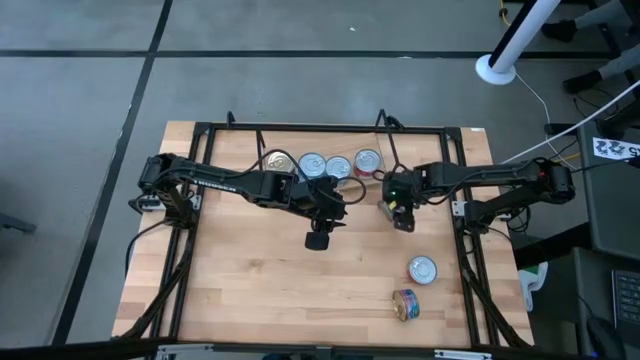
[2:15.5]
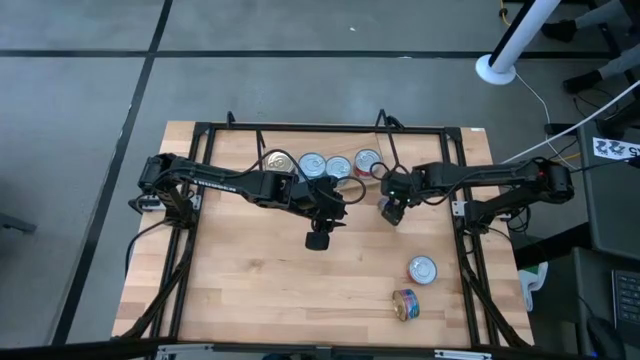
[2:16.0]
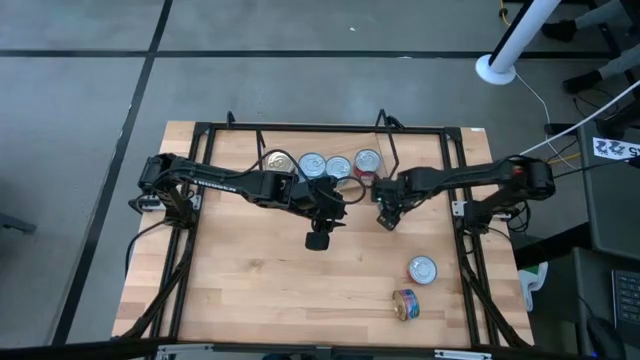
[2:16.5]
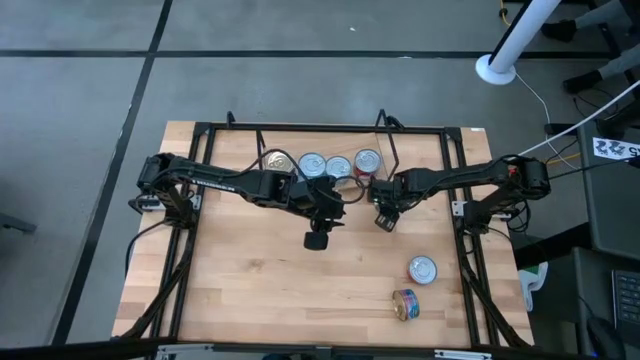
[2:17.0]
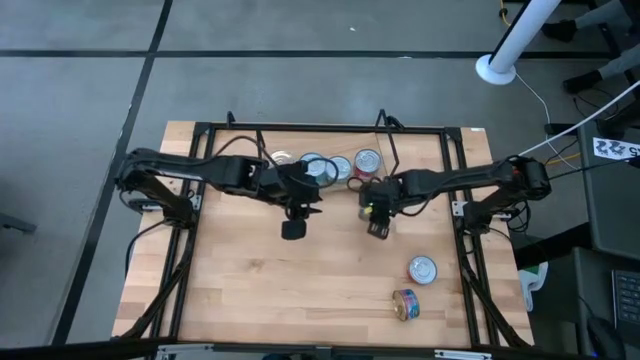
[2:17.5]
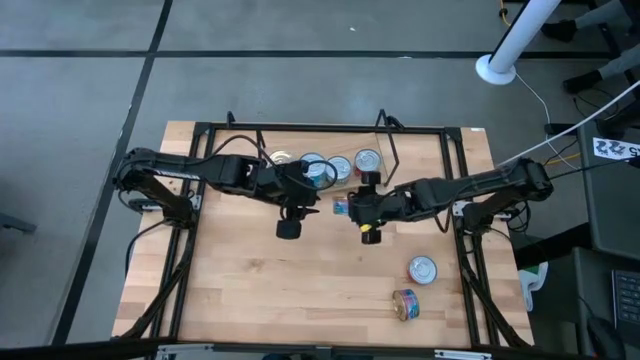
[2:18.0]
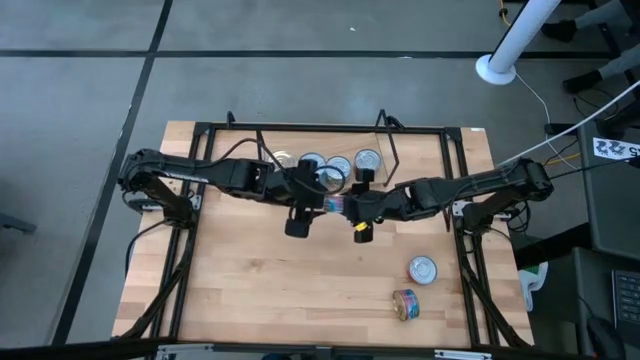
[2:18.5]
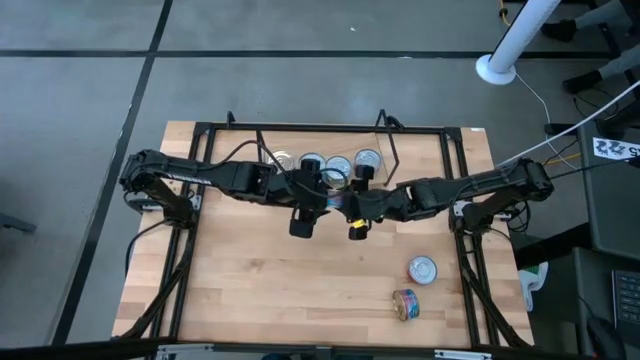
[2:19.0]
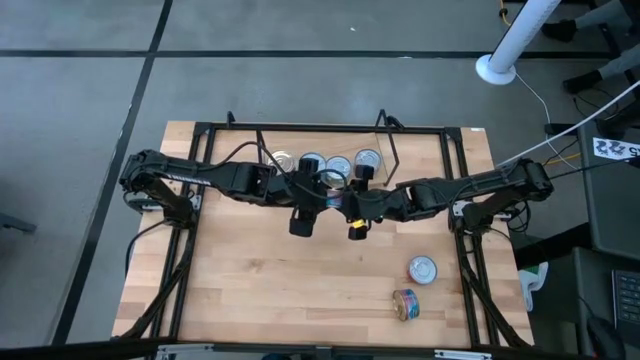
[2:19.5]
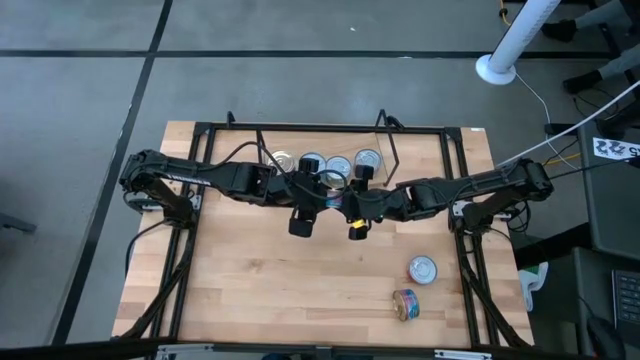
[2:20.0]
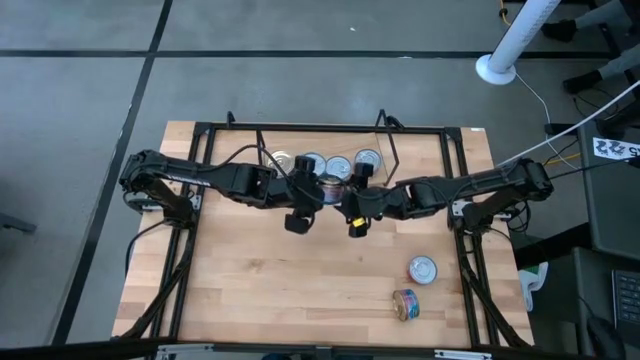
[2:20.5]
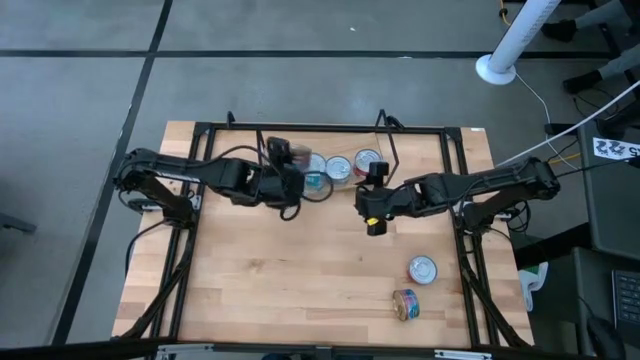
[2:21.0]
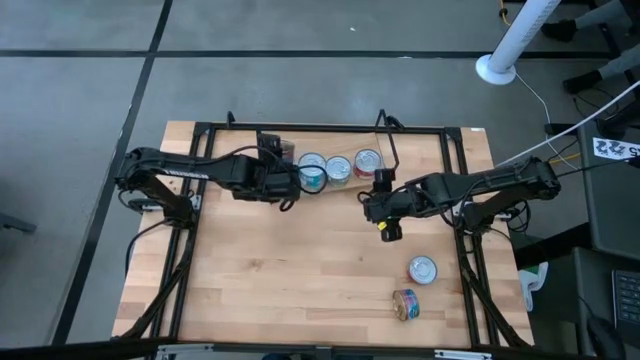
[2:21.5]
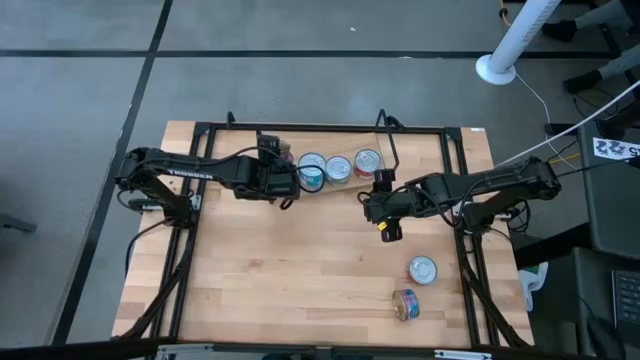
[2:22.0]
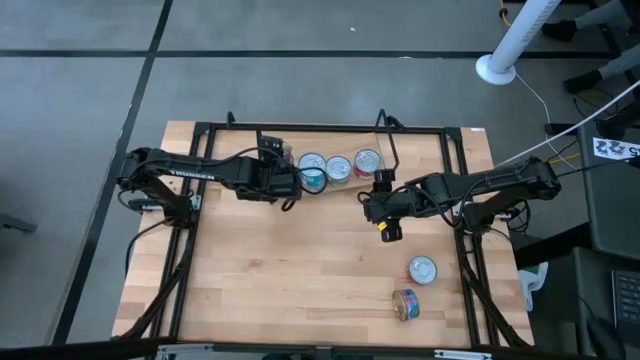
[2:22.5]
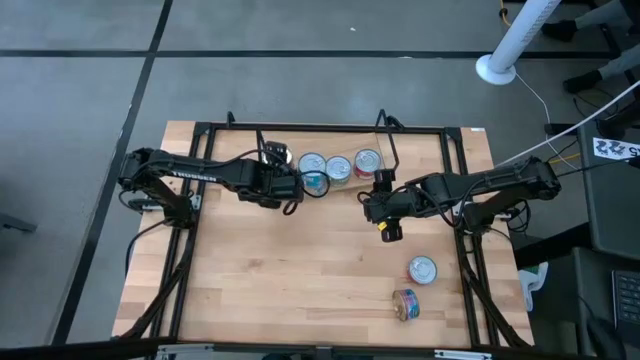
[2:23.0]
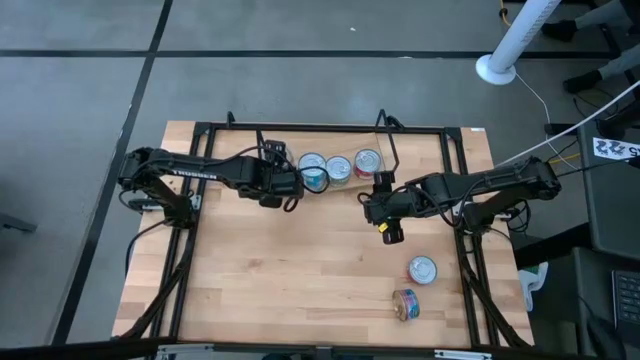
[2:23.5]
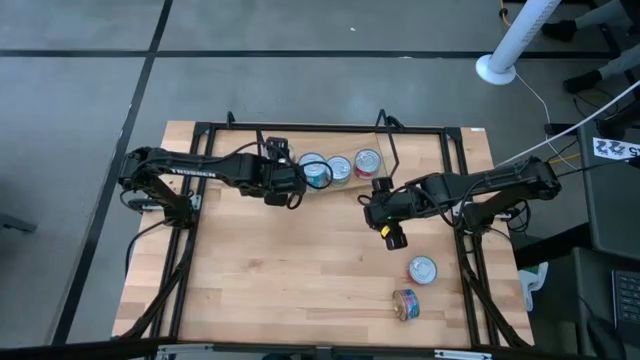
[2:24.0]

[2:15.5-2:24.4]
Task: Stack canned seafood by type on shelf
Stack the blue pink tuna can on top of the other blue tuna cans on the shelf

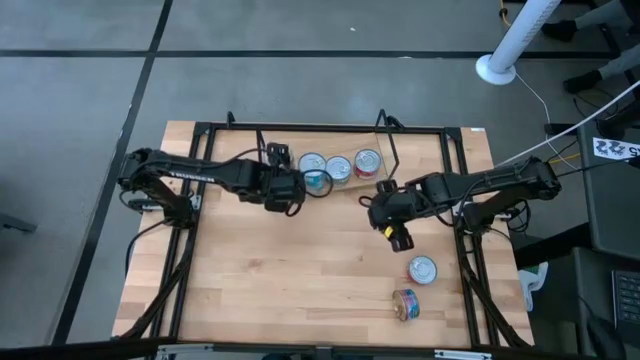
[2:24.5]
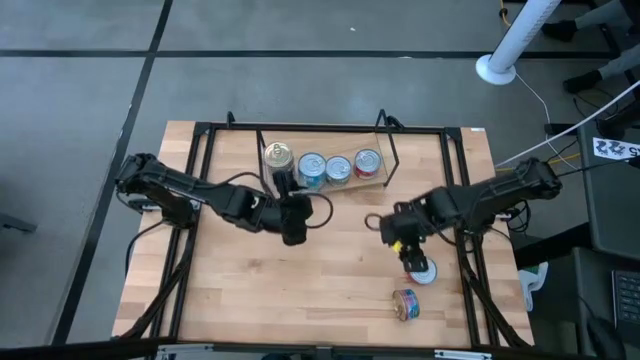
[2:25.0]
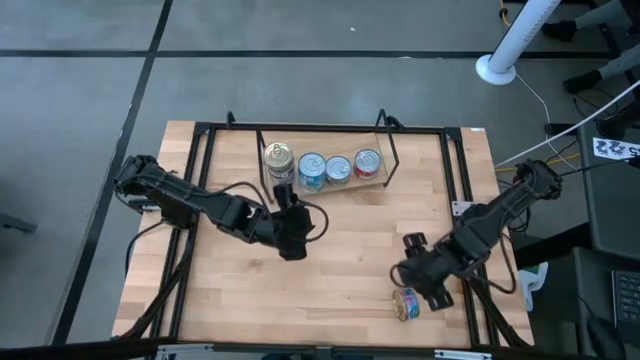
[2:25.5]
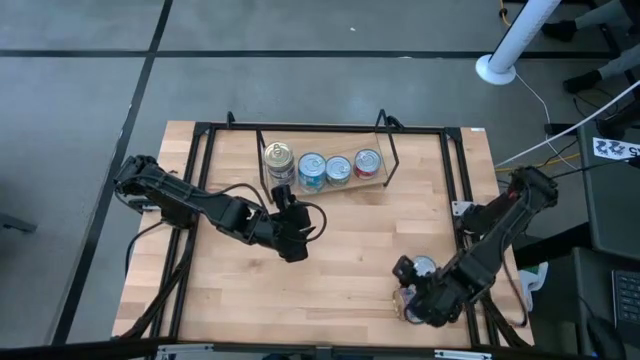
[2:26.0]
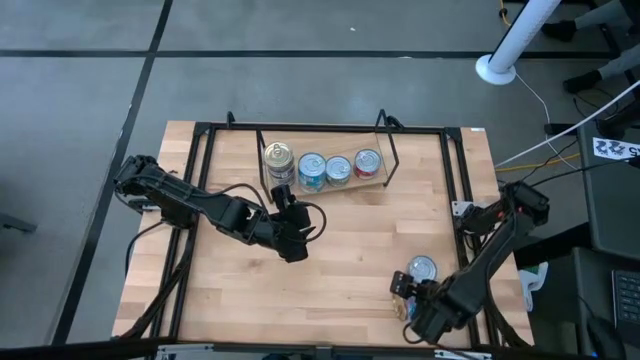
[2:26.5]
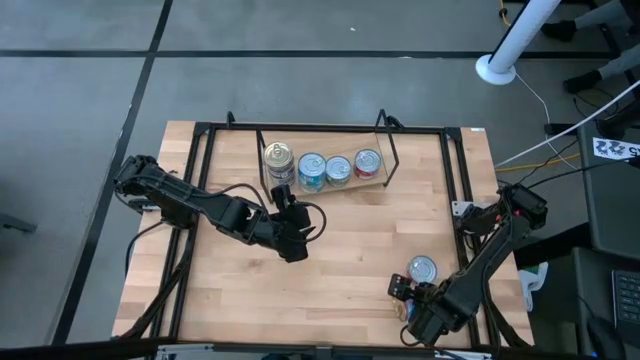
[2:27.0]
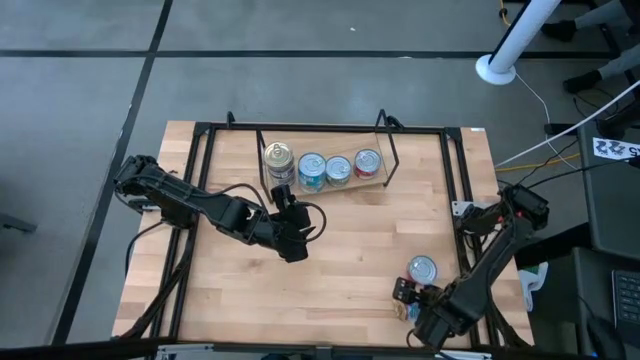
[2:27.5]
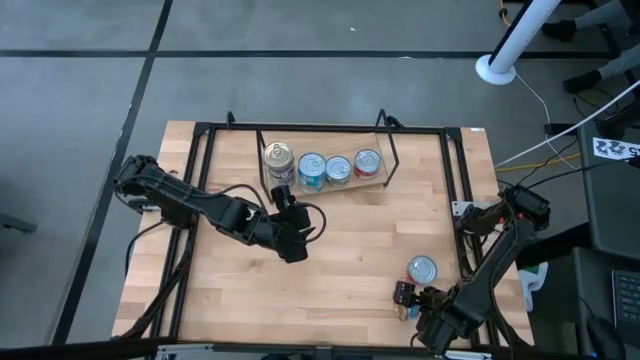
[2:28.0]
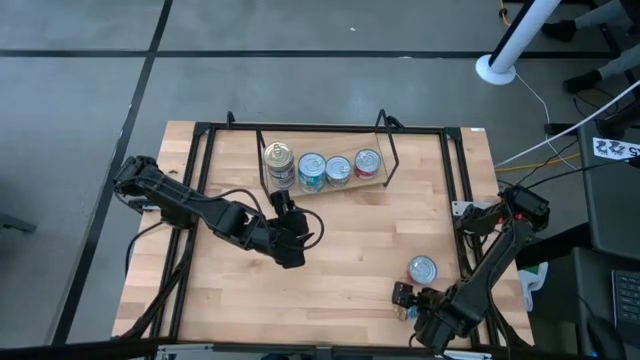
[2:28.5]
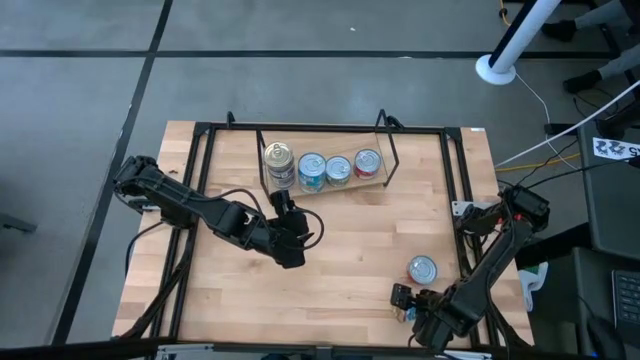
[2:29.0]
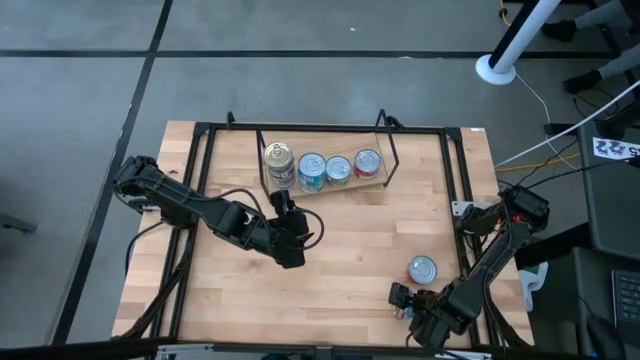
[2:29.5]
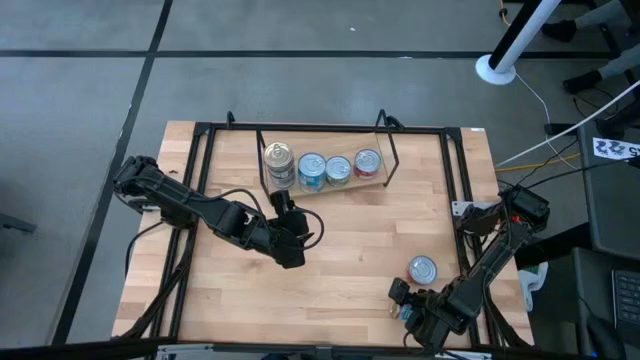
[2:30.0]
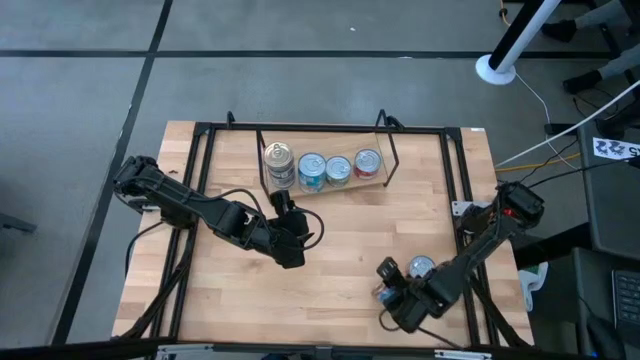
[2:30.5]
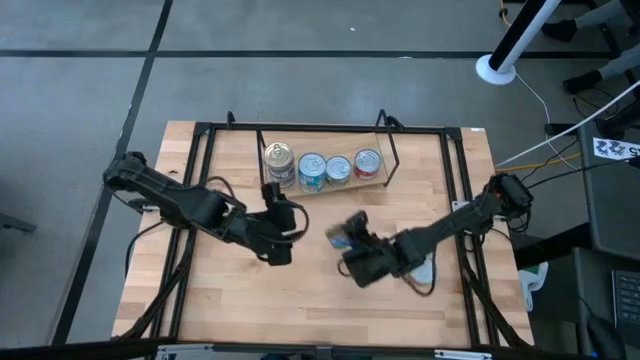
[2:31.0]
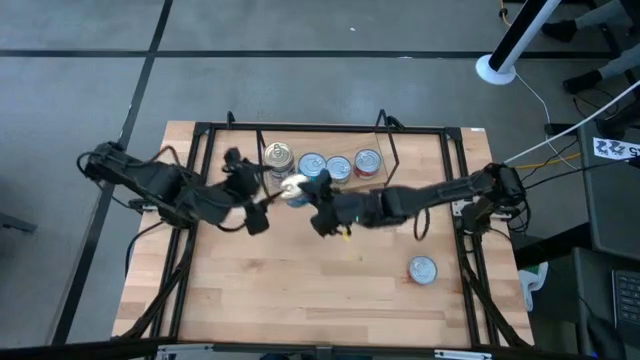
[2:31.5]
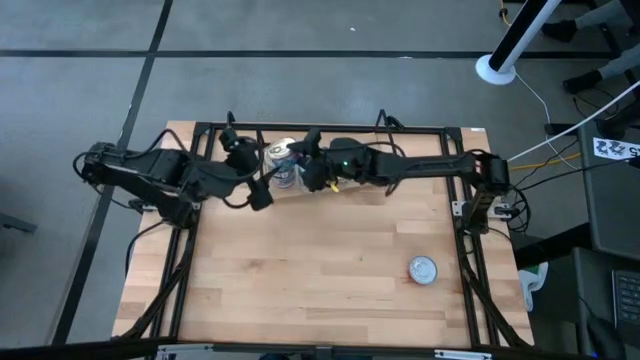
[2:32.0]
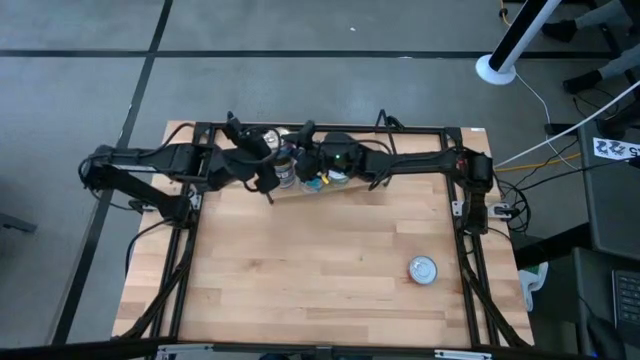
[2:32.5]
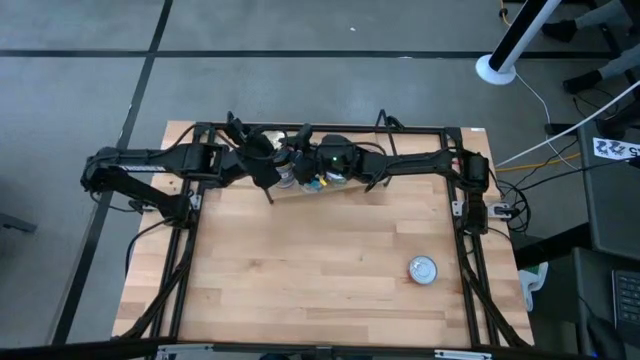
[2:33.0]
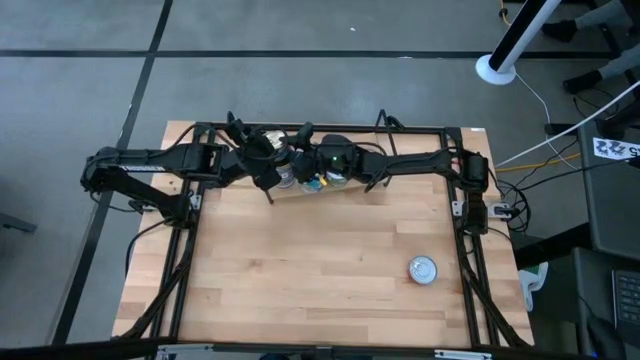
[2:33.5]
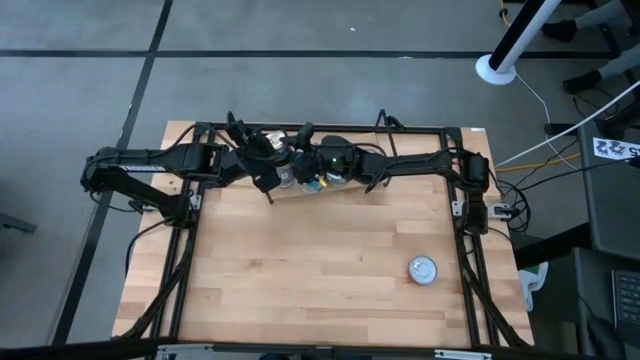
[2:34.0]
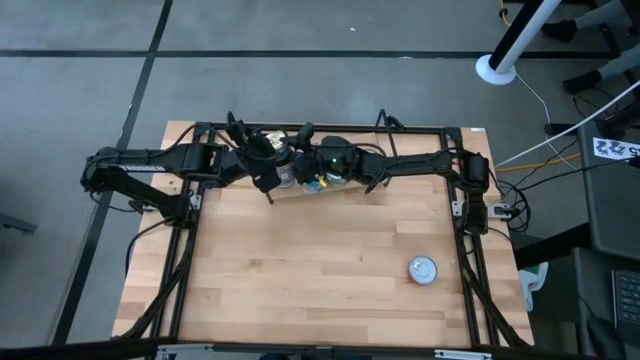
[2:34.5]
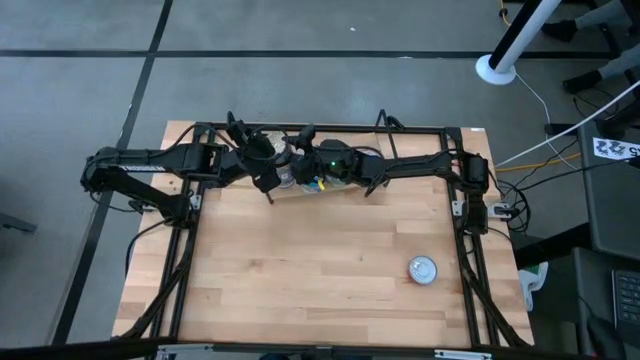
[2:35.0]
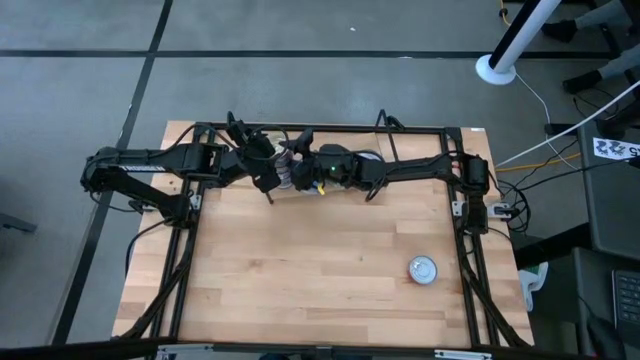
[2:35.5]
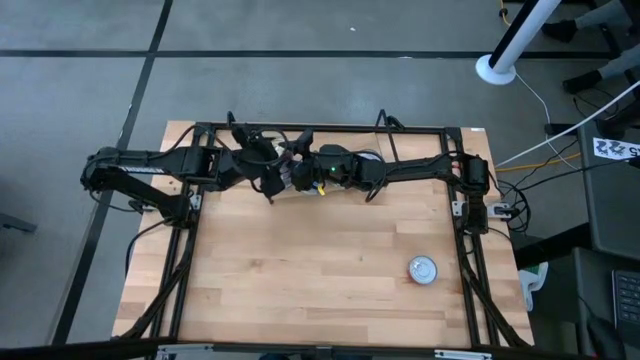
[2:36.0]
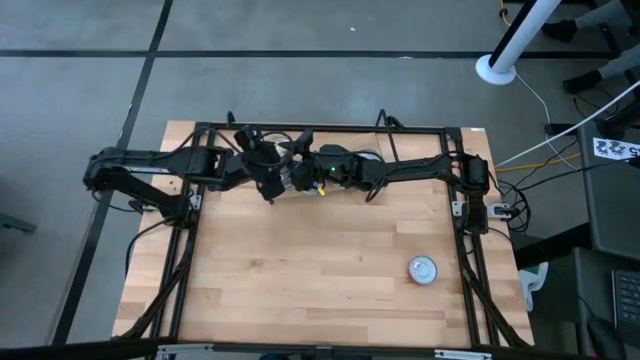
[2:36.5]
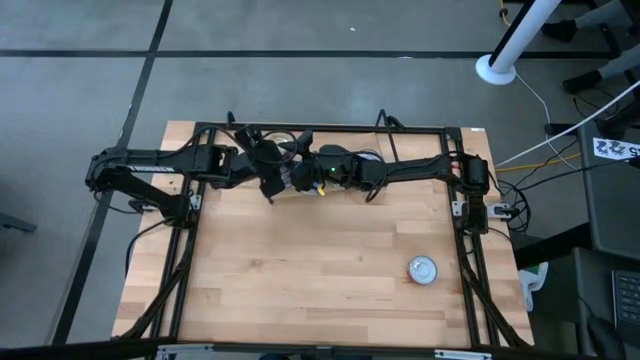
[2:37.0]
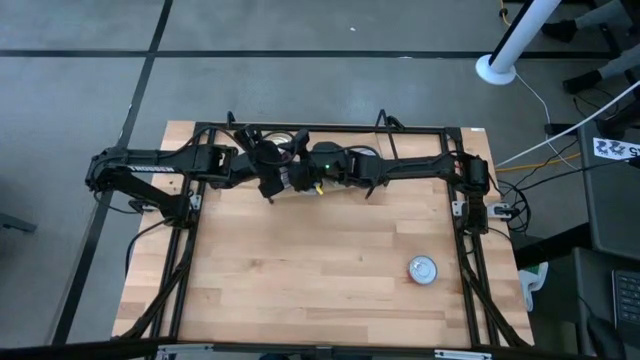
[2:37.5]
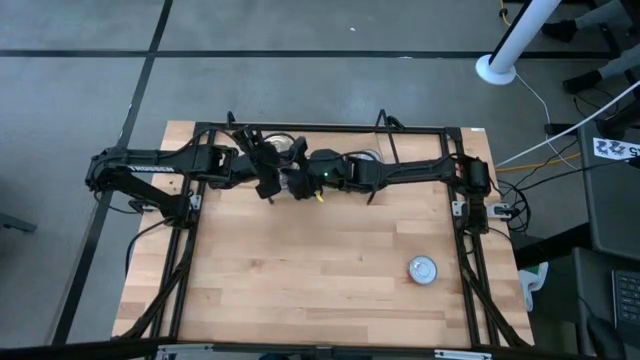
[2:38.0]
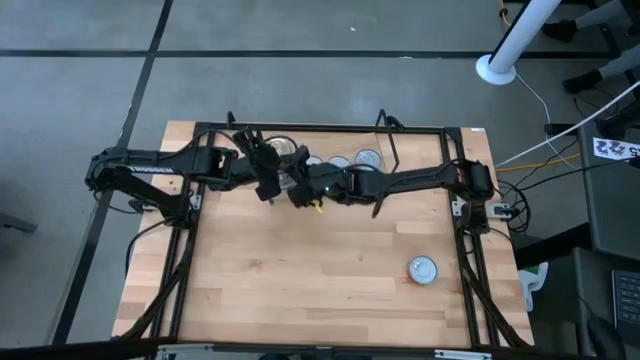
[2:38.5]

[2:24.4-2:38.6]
Stack the blue pink tuna can on top of the other blue tuna cans on the shelf
